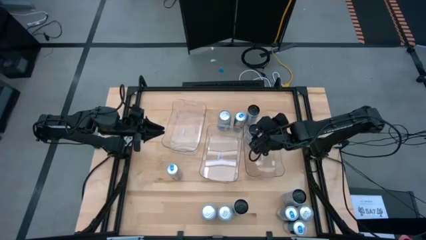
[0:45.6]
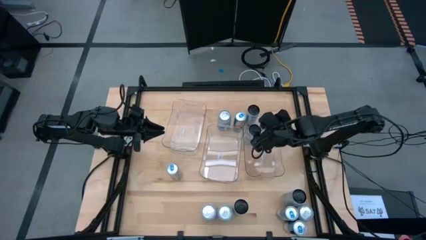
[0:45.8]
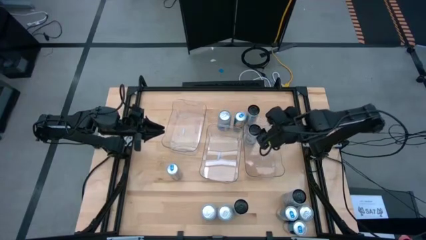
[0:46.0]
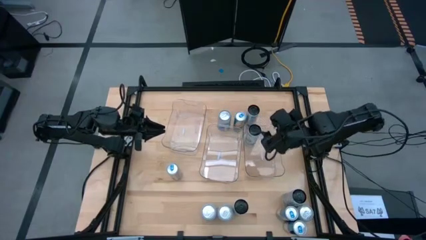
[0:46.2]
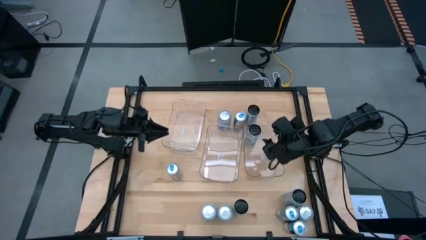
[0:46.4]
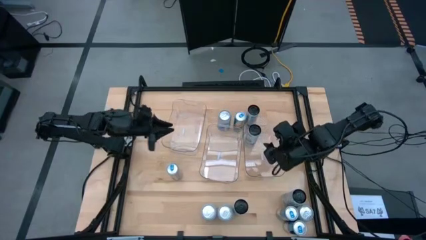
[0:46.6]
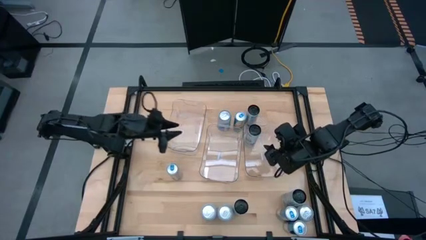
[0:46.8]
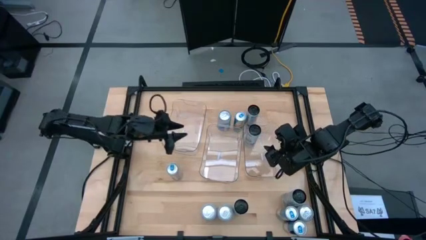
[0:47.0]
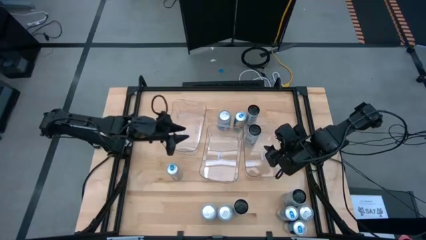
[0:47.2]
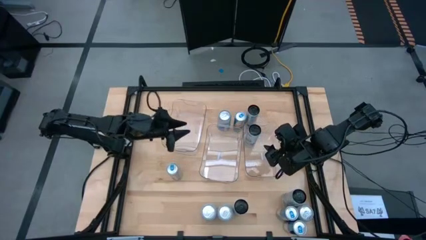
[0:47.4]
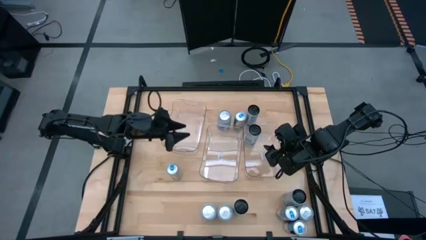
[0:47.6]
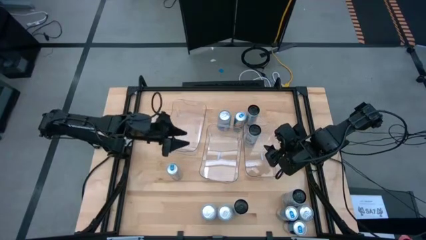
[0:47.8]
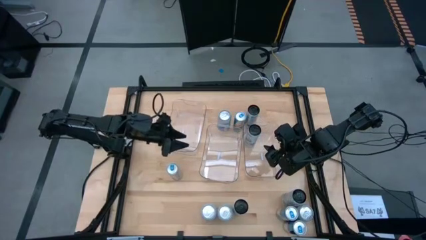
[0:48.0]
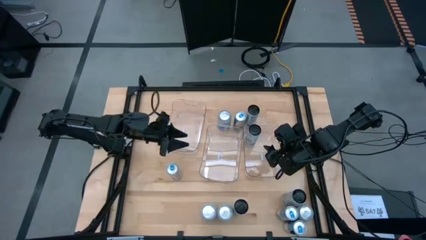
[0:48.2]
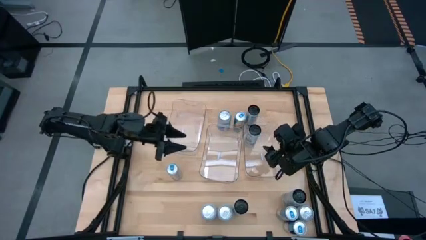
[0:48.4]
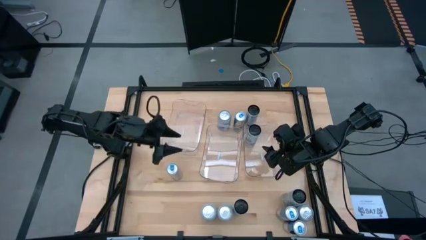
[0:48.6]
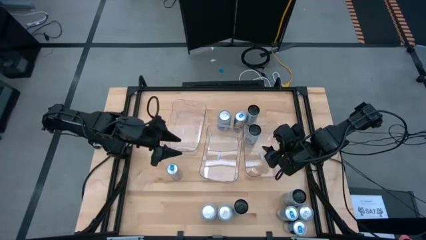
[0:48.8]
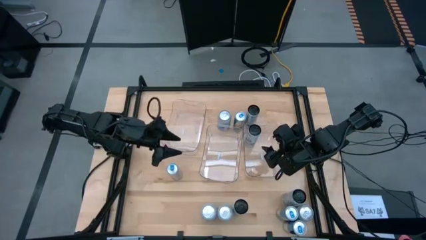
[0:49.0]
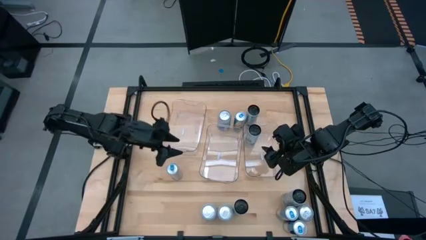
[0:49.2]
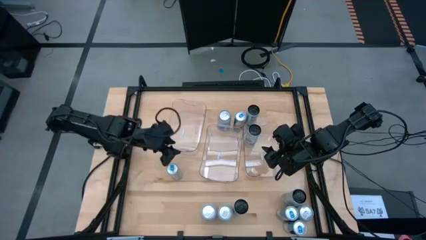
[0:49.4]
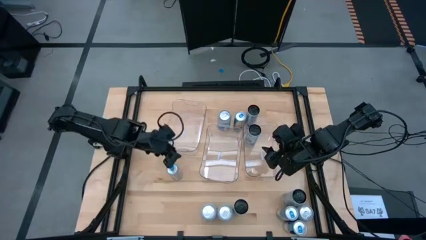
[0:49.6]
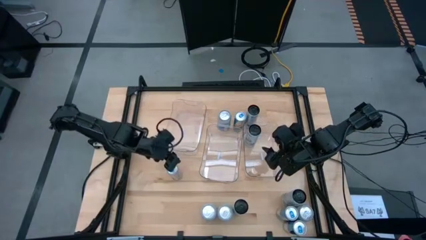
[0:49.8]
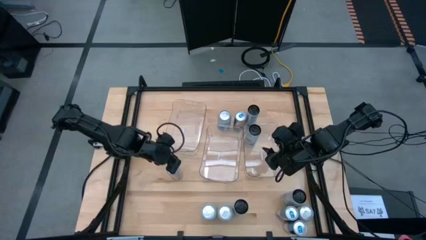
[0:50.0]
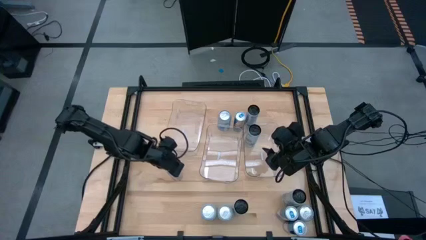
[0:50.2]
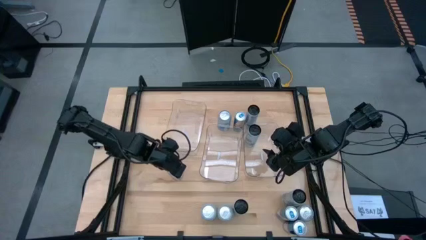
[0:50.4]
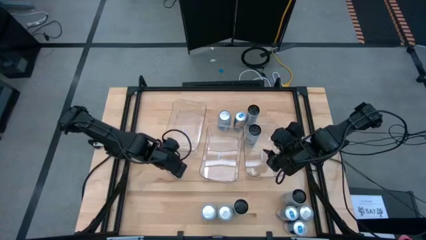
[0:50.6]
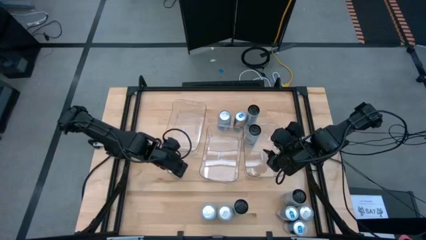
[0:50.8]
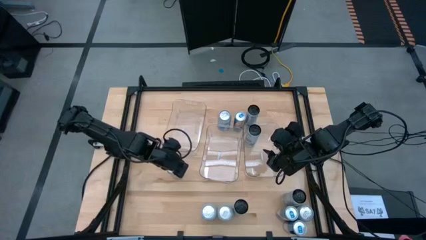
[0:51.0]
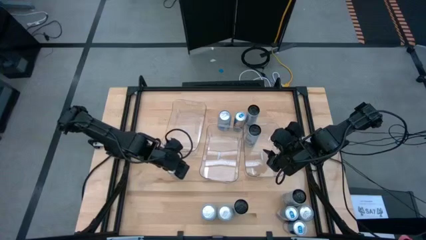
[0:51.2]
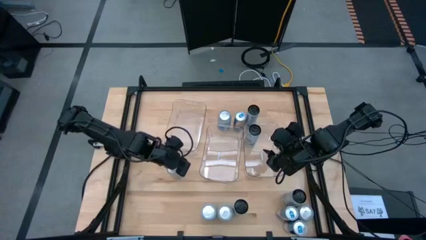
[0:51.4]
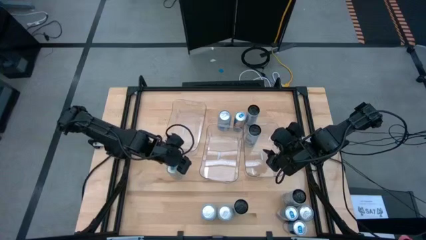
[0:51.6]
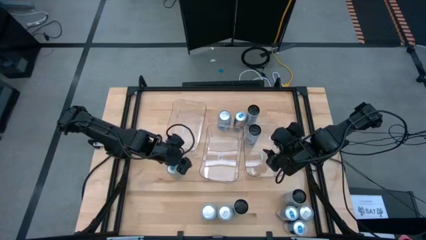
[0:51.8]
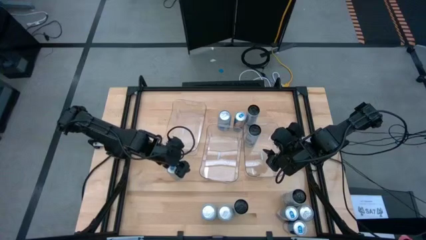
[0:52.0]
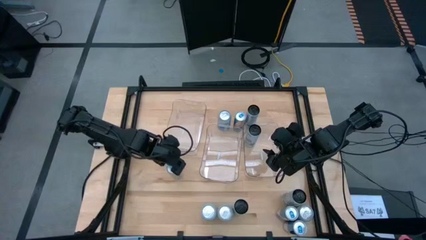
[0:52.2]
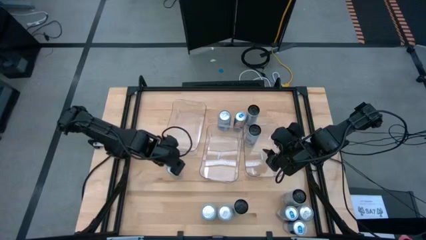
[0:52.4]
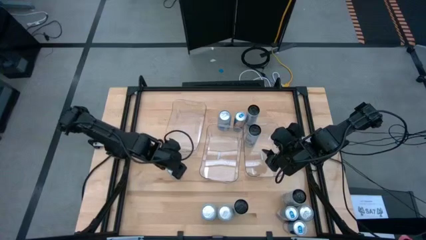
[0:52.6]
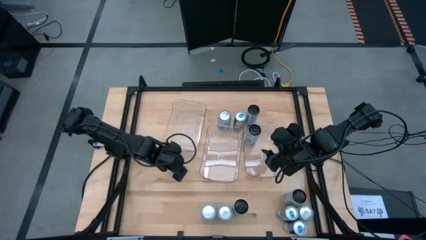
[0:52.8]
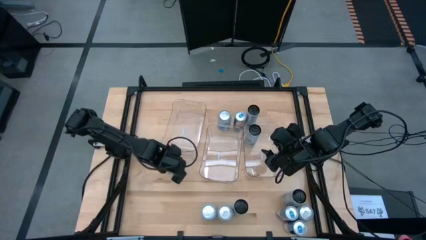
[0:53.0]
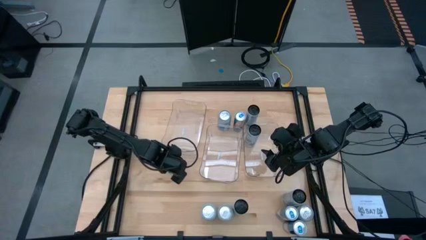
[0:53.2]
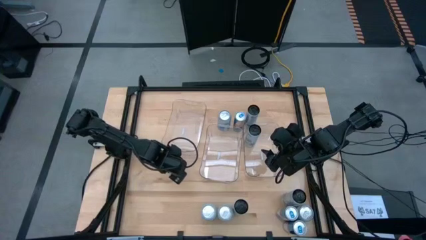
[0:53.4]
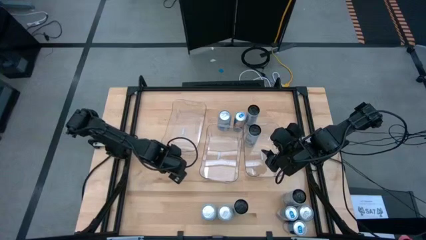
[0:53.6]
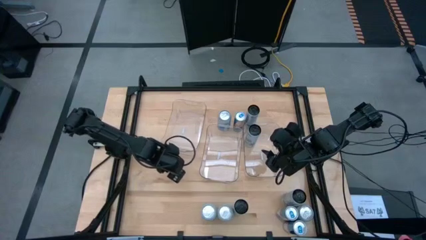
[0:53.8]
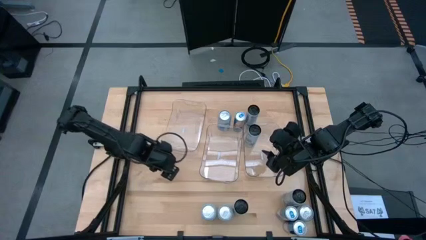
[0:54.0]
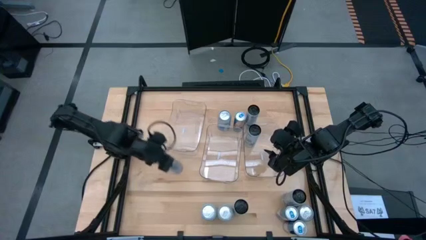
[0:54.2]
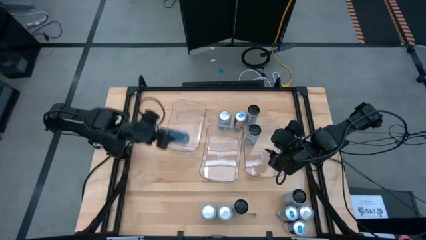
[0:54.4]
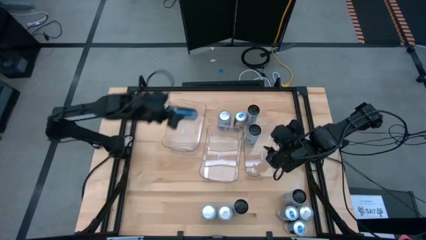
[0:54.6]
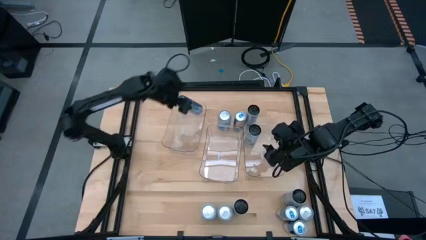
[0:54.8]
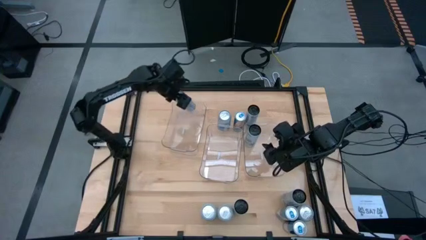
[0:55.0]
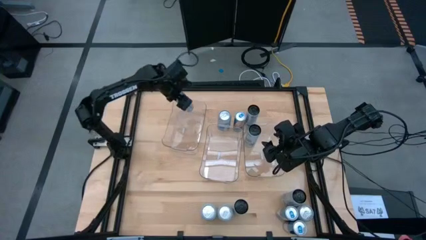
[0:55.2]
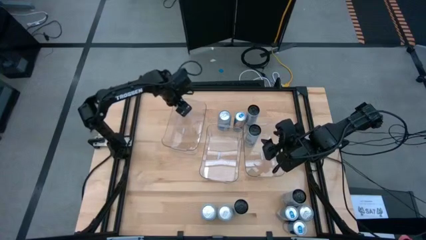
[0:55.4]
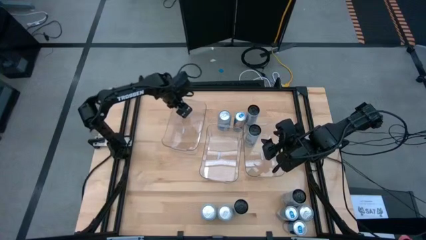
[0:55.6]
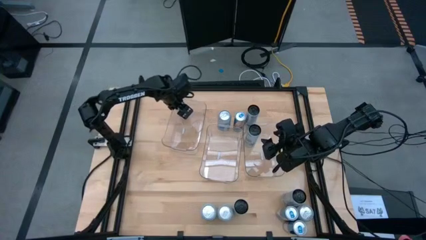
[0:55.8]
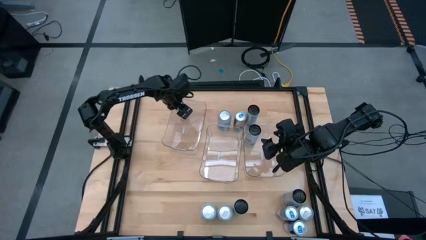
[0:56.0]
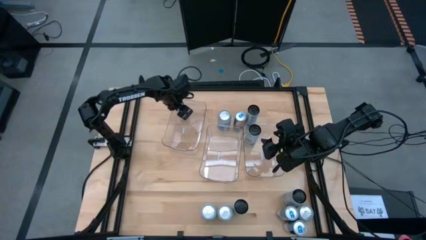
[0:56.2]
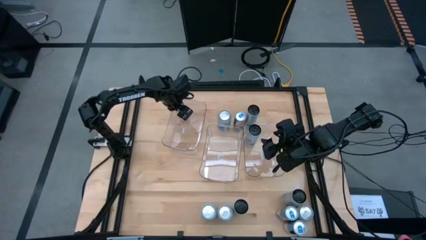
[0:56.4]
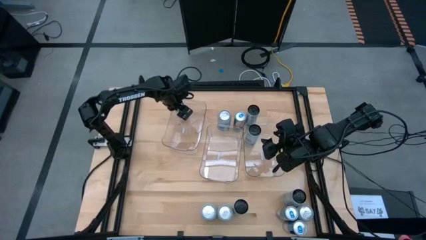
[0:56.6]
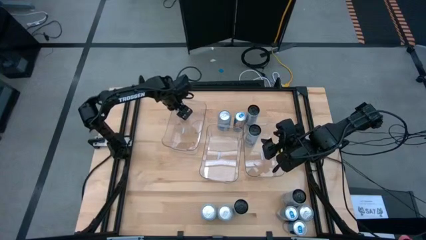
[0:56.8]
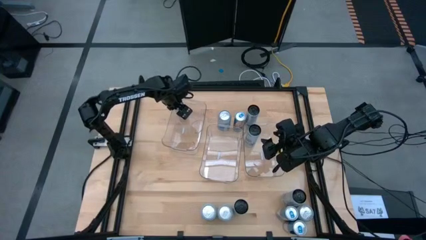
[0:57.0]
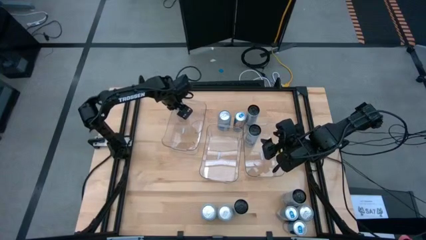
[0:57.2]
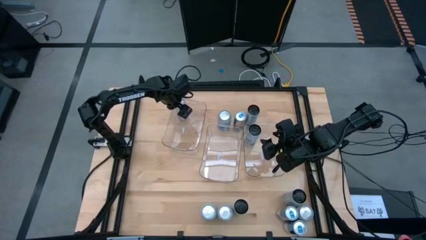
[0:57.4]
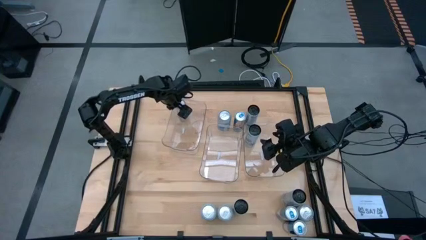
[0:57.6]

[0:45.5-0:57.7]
Task: Sort soda cans
Put the middle left blue soda can into the left transparent bin

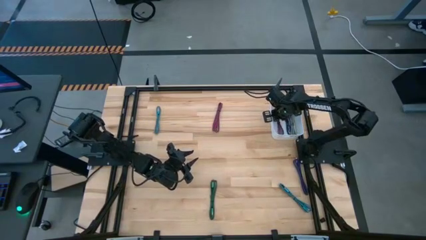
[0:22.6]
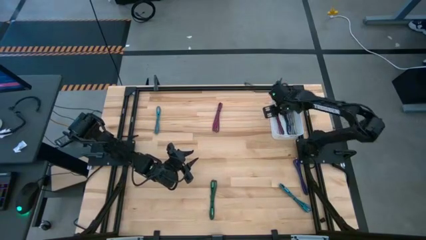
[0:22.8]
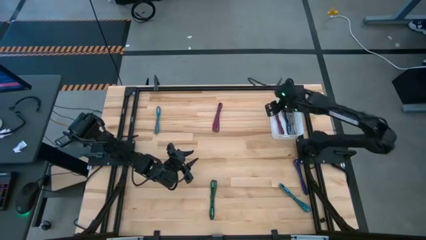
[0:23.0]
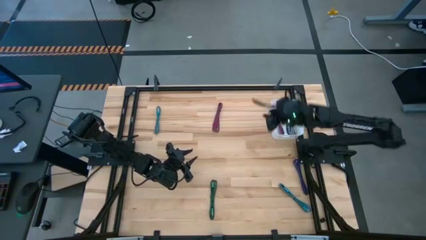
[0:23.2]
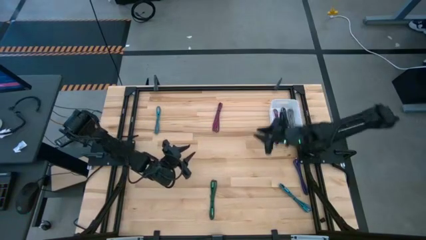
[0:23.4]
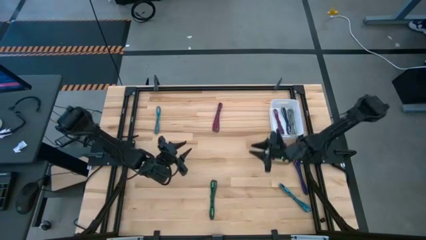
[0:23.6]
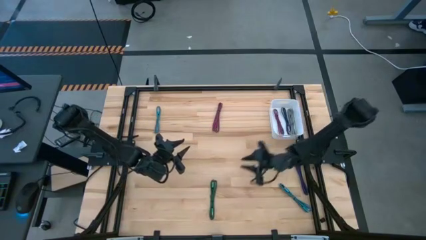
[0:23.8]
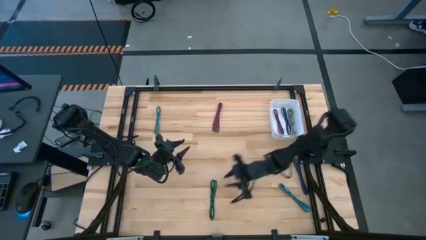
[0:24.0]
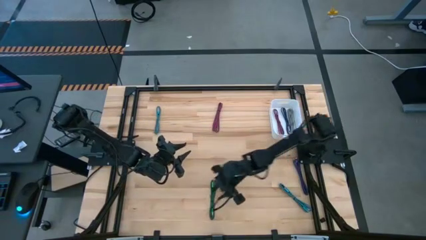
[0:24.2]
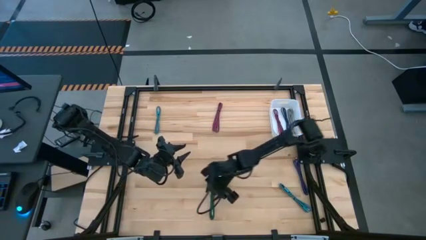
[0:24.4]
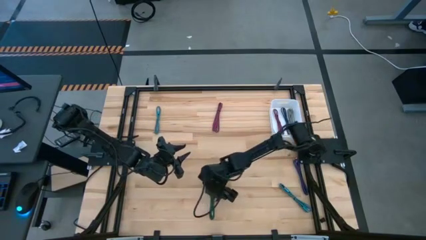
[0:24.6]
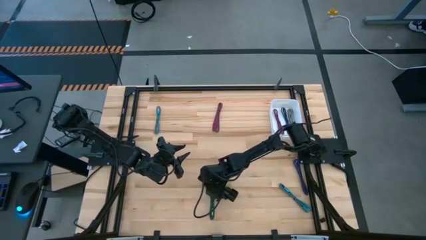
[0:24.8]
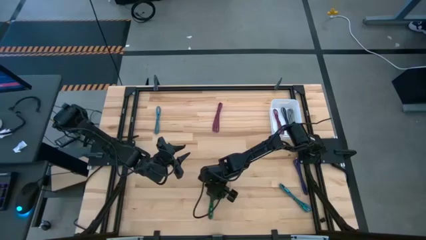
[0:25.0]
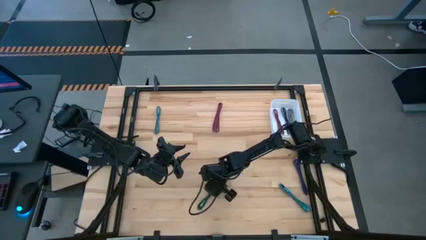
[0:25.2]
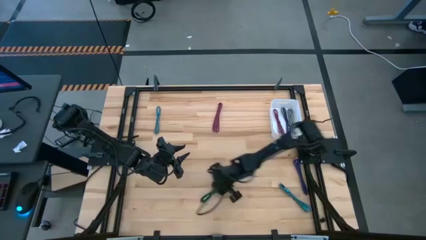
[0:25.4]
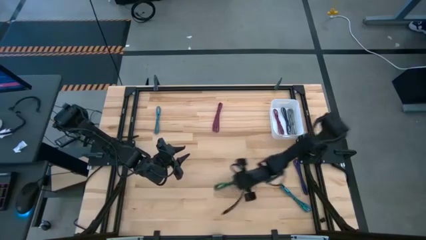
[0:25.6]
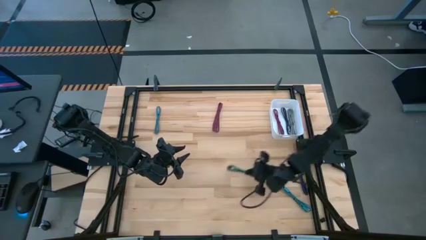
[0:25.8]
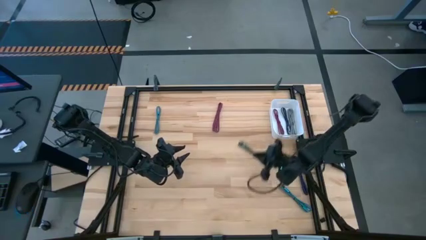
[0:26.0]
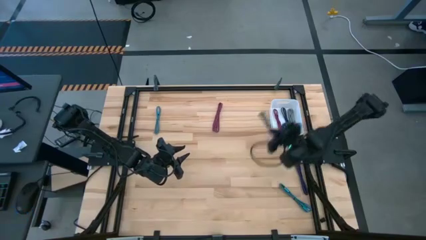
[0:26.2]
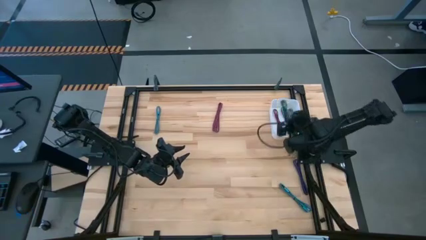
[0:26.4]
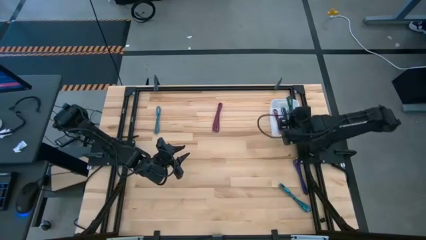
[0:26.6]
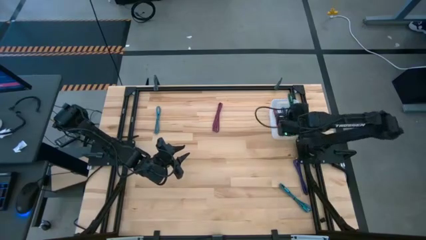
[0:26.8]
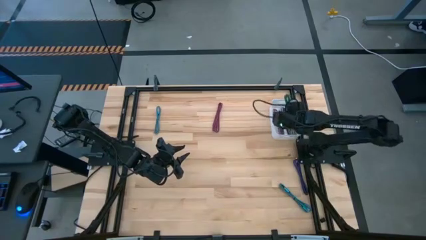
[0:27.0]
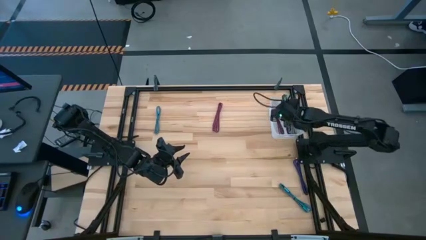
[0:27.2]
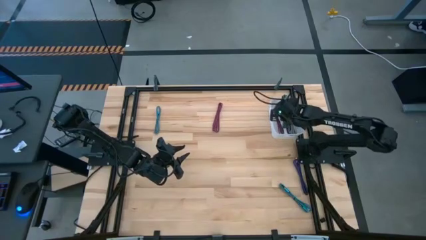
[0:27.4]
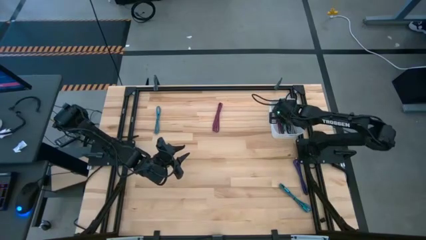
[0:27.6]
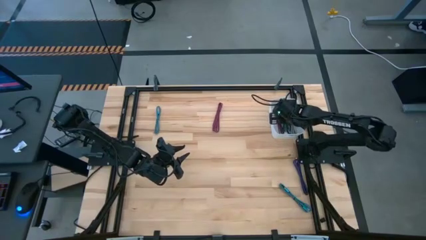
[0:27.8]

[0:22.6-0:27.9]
Task: Pick and place USB-C Cables
Put the green charger cable into the white bin
